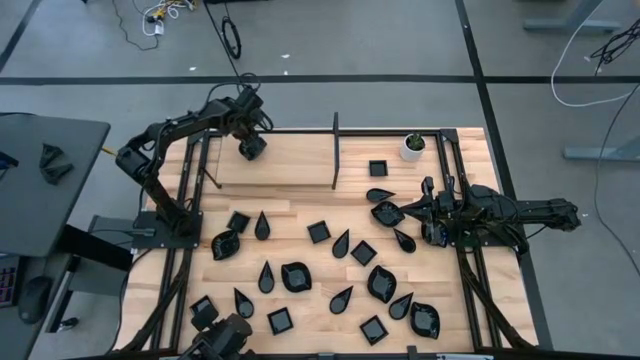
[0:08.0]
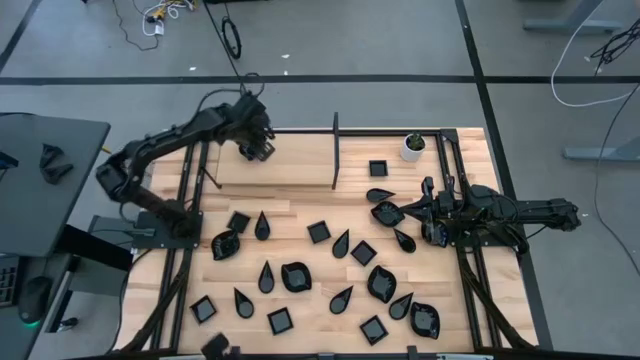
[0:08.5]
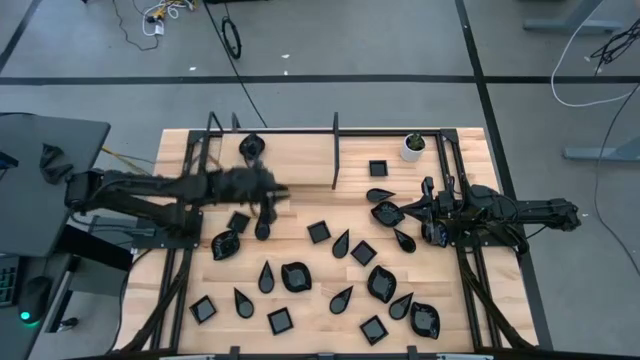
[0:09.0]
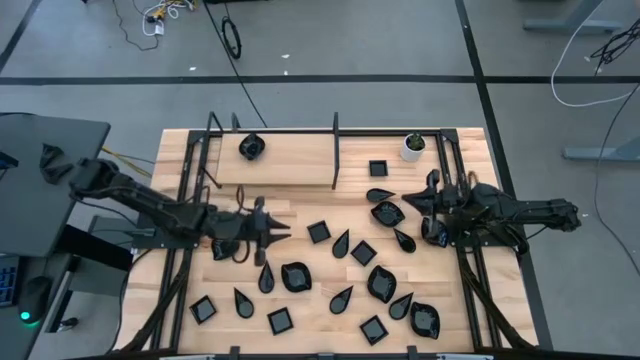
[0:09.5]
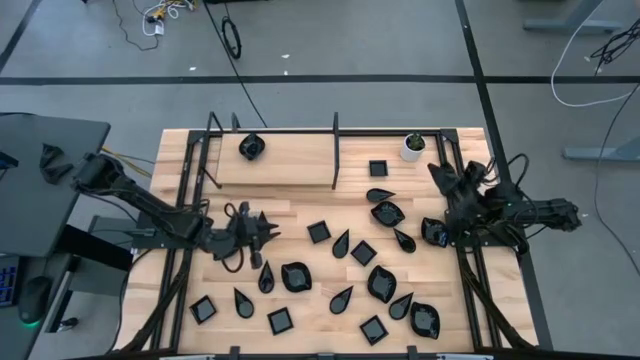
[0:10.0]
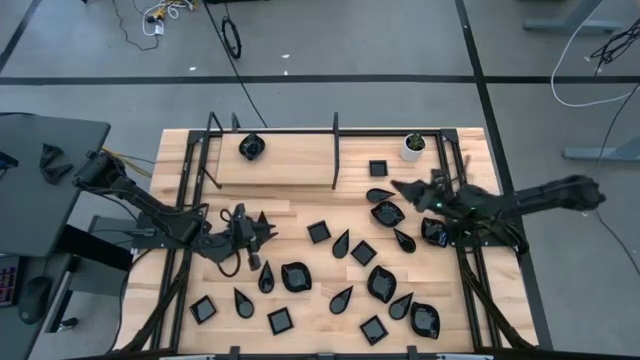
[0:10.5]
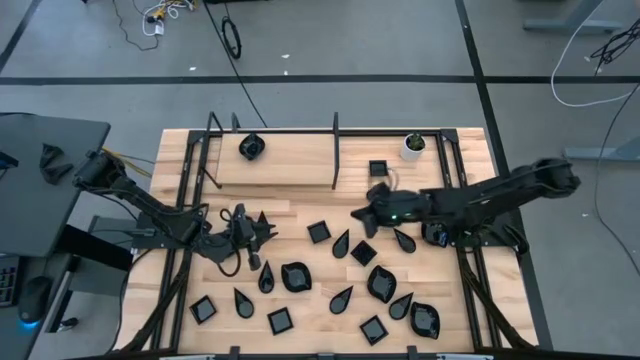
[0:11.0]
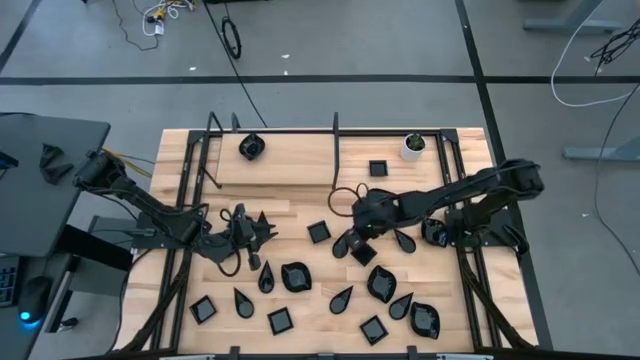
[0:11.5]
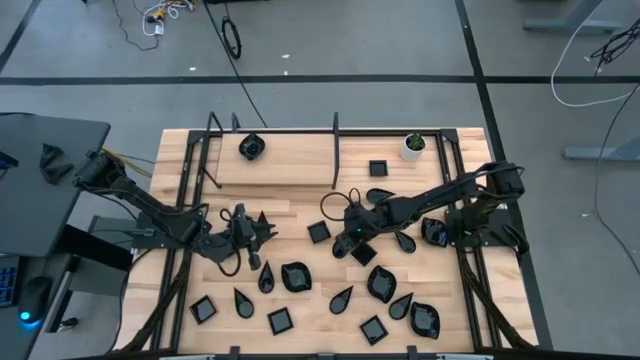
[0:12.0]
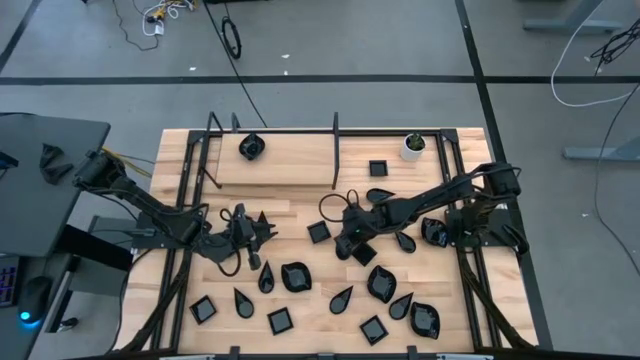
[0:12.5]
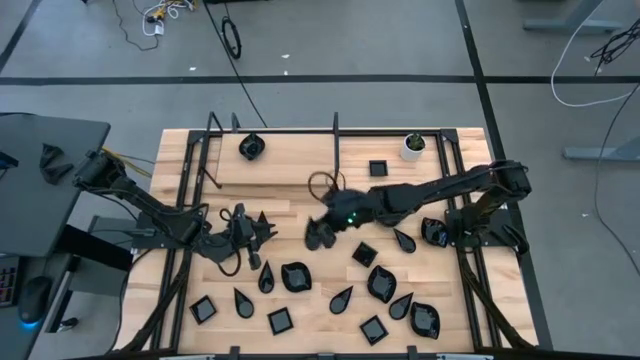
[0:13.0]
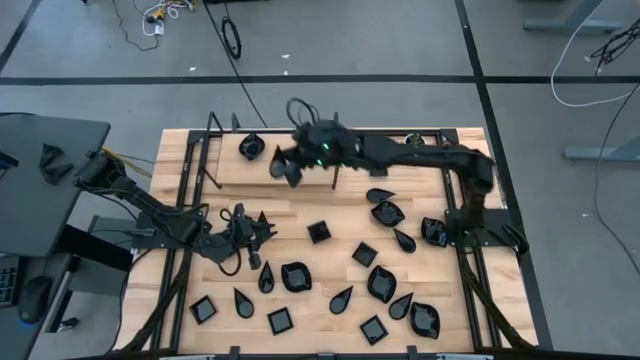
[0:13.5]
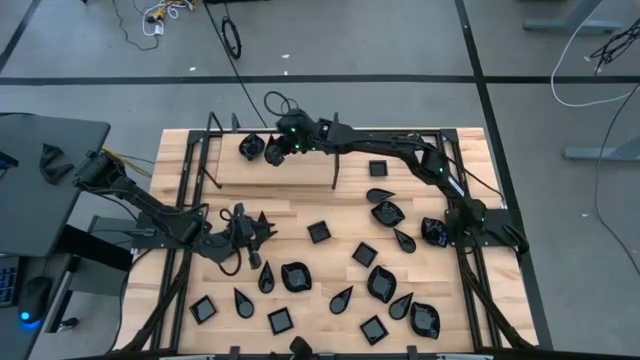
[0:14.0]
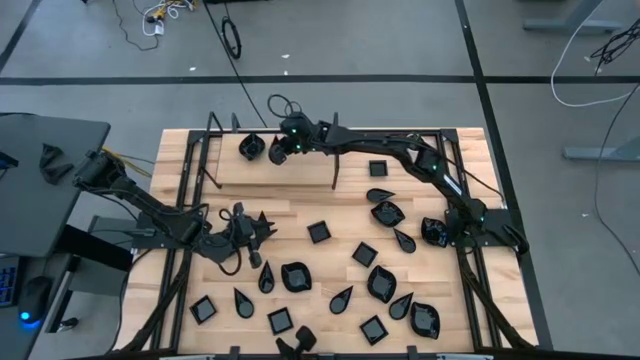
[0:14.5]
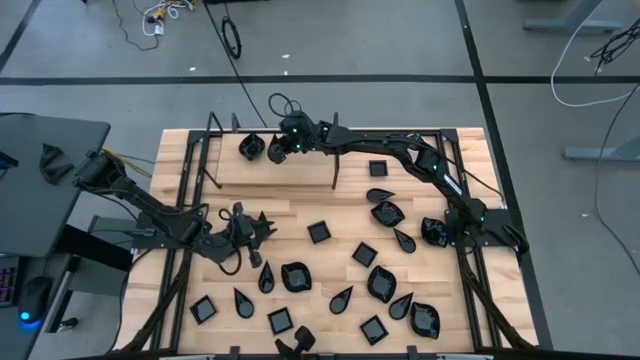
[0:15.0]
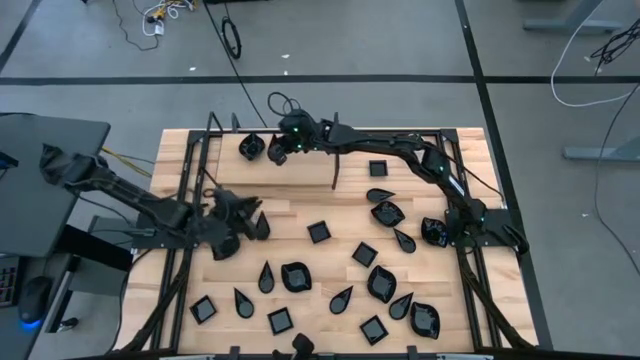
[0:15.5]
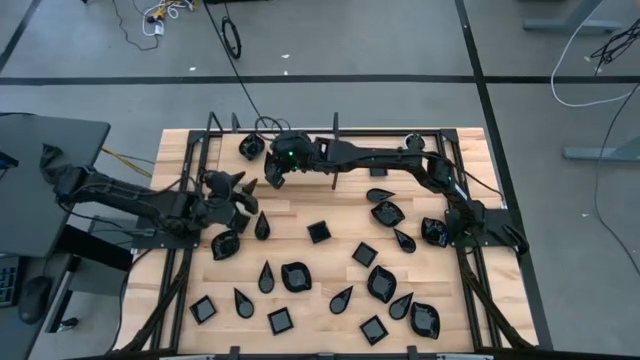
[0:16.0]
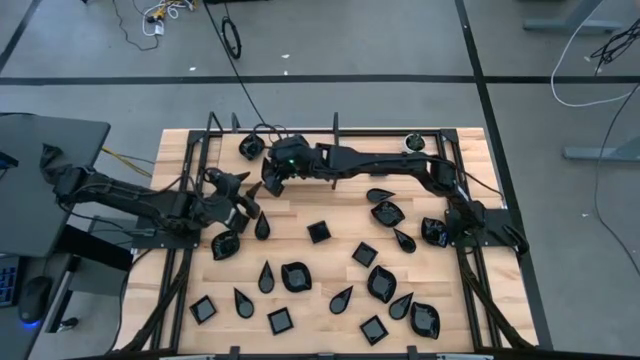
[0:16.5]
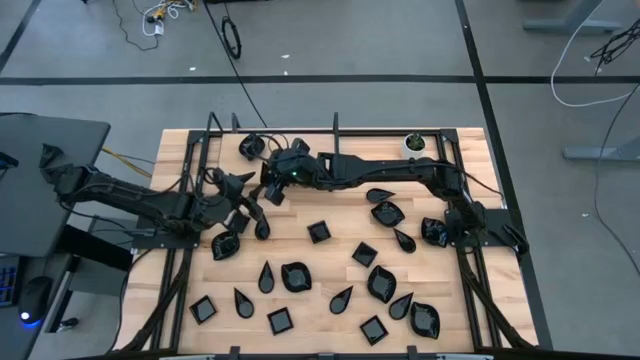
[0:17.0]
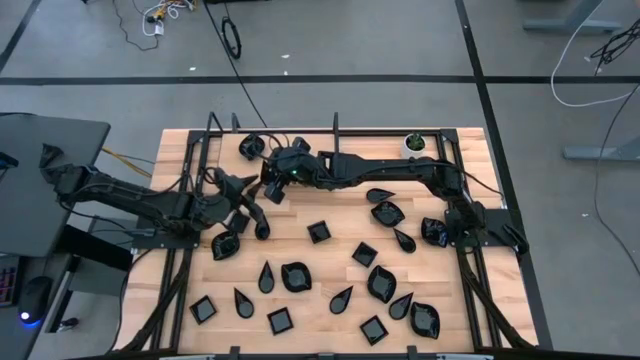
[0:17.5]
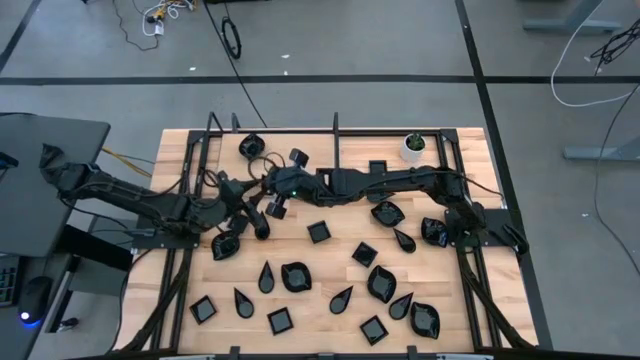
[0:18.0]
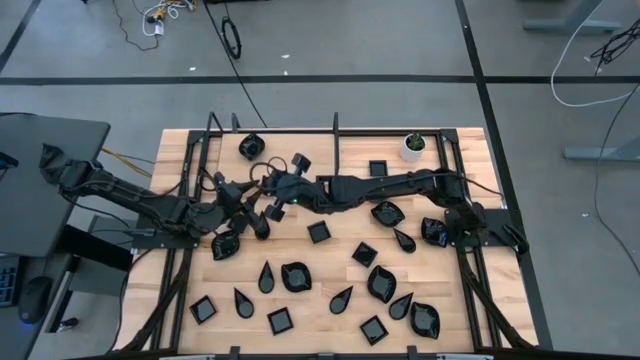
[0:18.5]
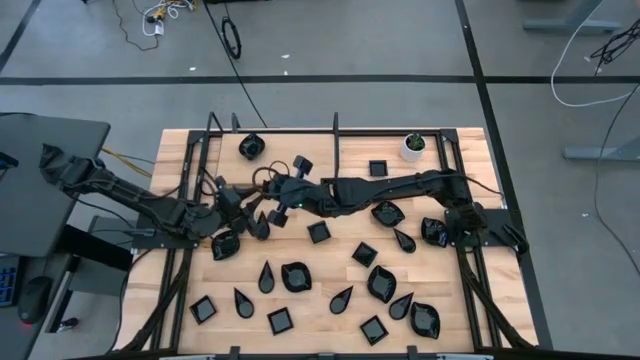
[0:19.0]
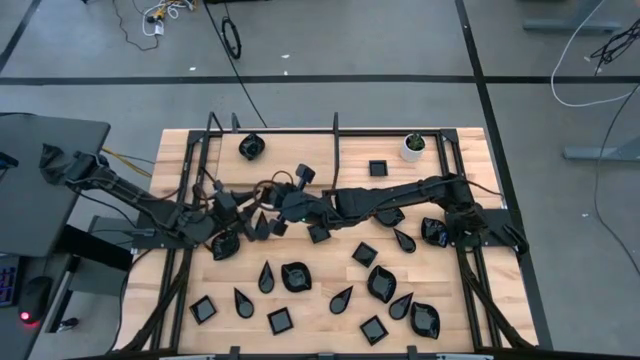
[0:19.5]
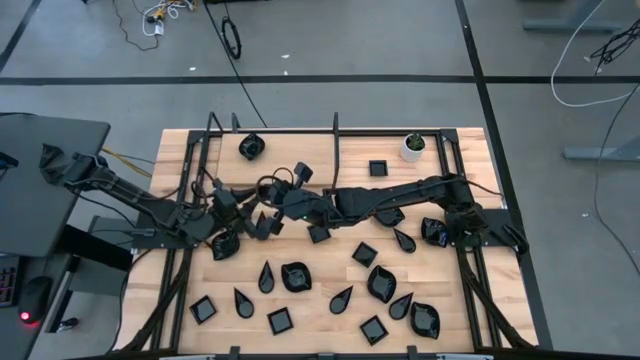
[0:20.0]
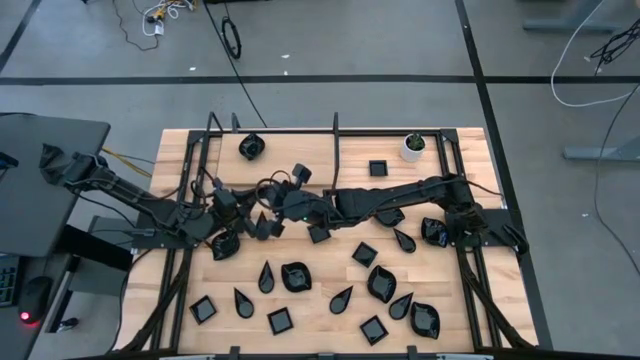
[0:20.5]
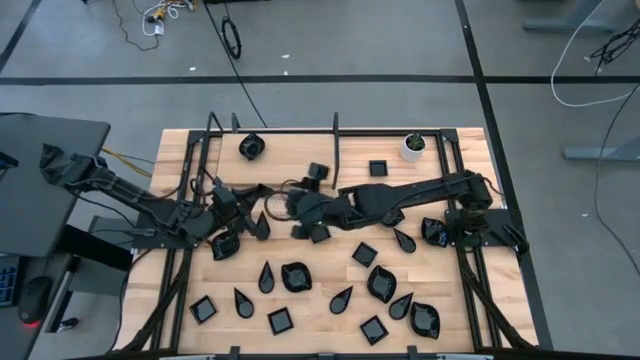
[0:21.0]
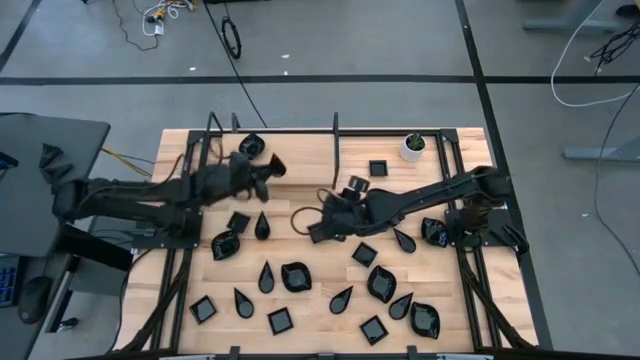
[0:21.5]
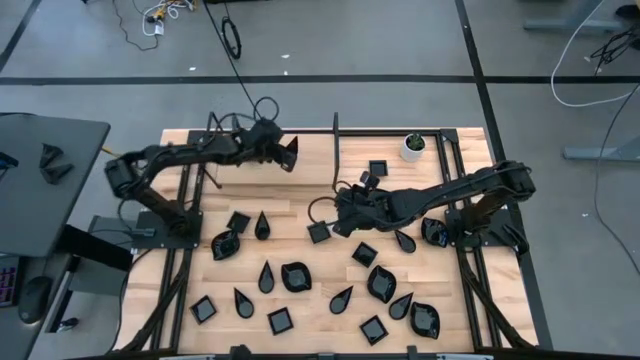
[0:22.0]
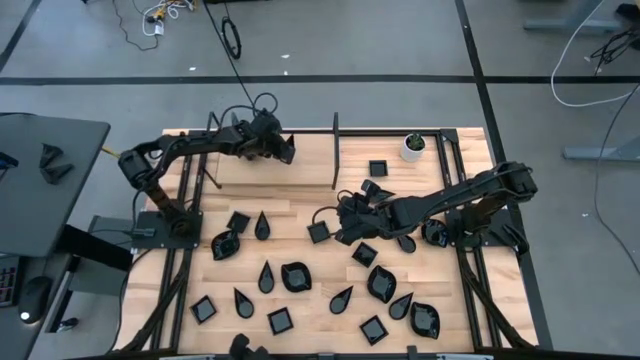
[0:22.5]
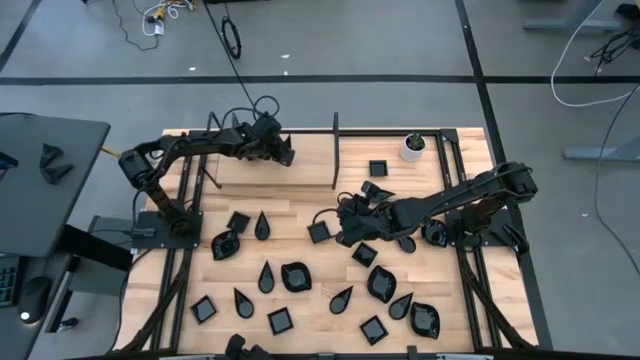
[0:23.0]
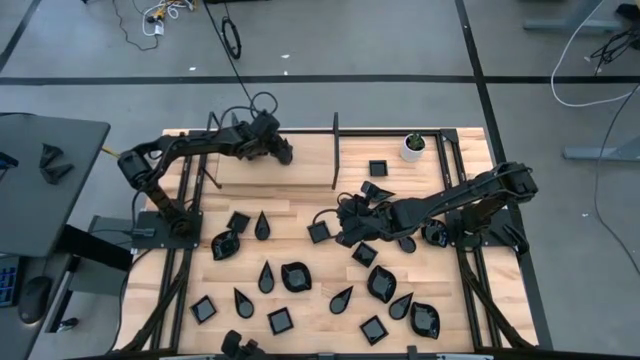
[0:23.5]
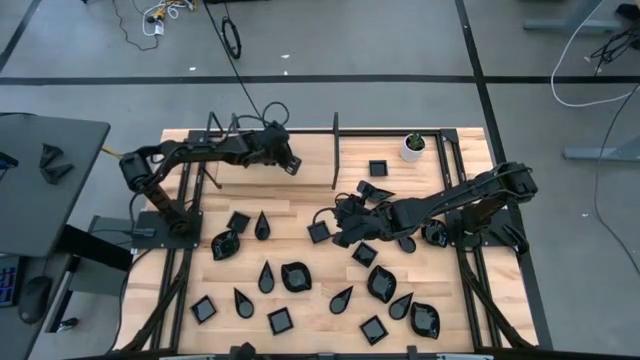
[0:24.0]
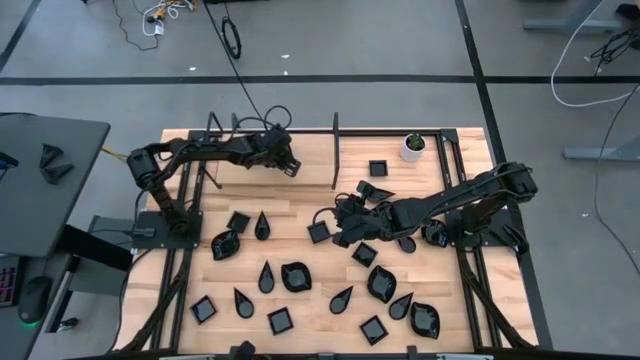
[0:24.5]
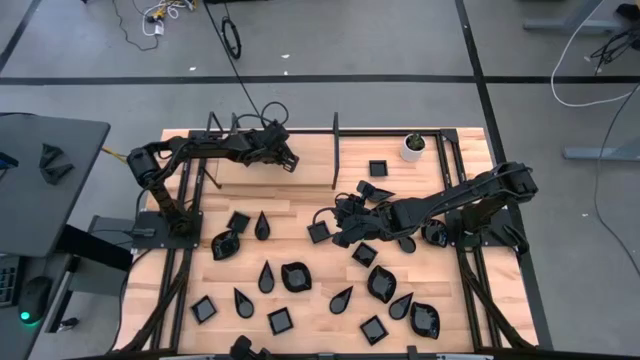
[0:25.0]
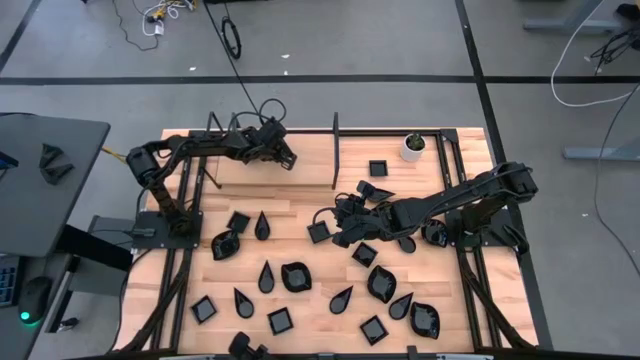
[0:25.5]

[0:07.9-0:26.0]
Task: Pick & Place Mini shaped plates
Put the black drop-shaped plate on the shelf

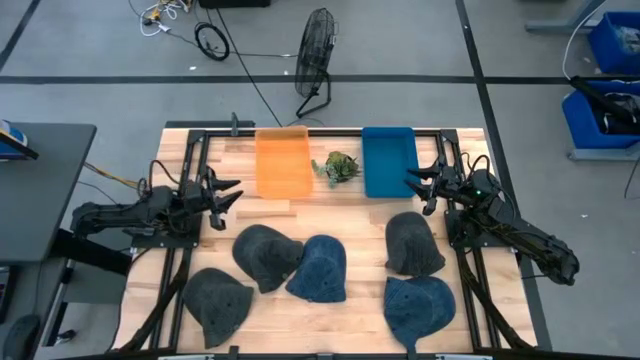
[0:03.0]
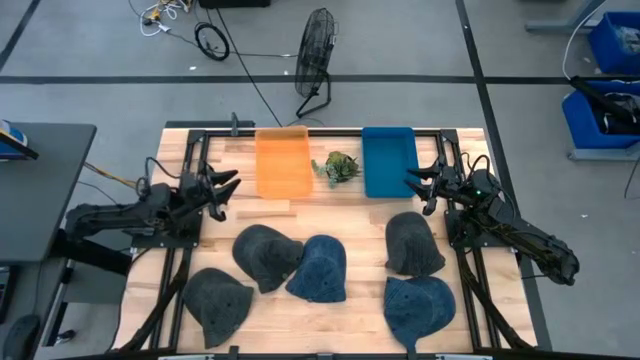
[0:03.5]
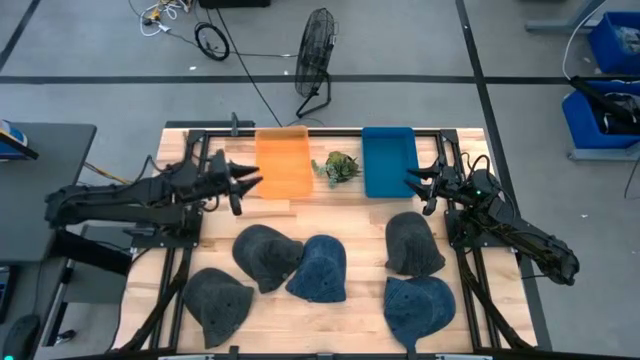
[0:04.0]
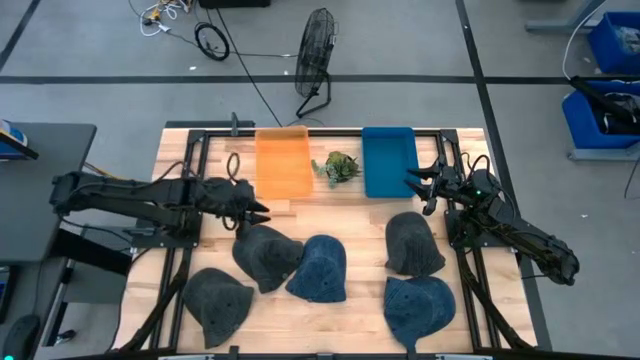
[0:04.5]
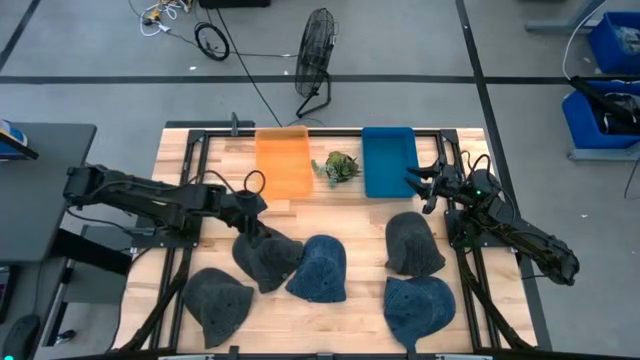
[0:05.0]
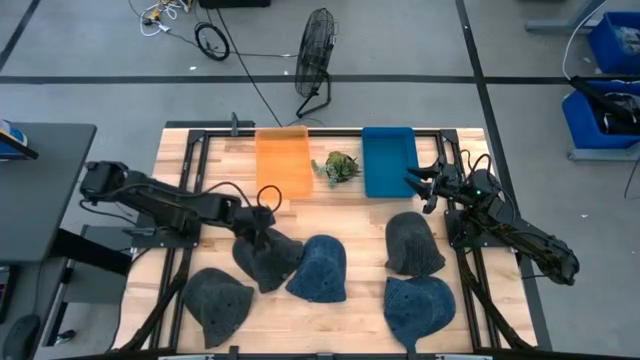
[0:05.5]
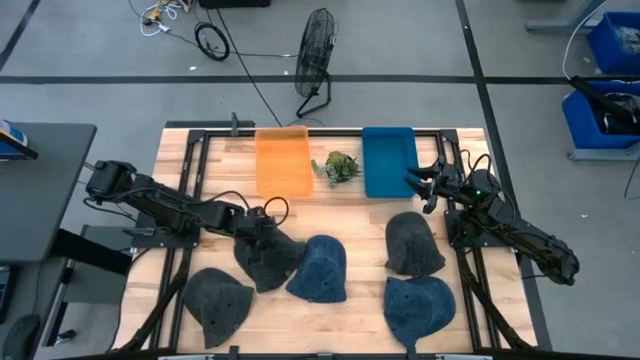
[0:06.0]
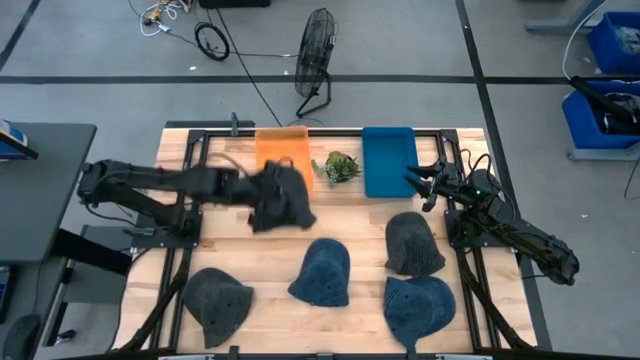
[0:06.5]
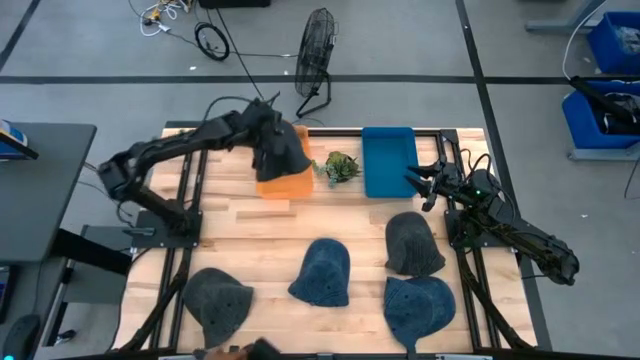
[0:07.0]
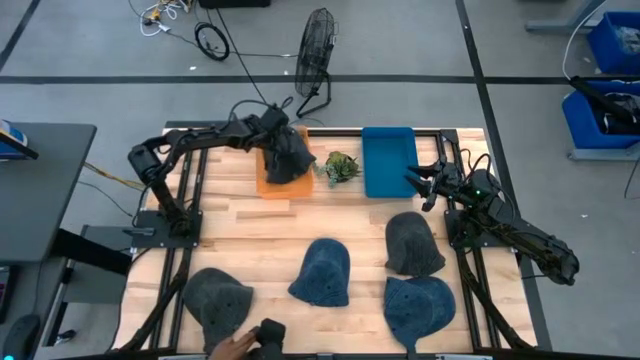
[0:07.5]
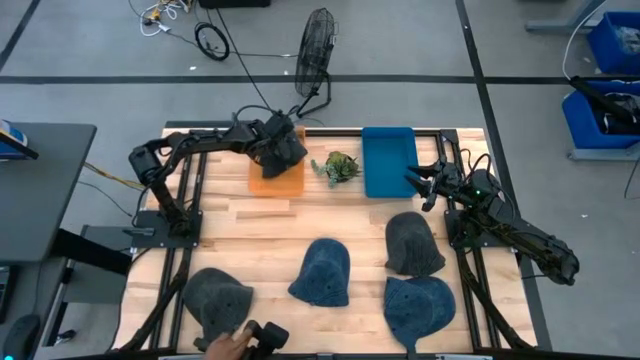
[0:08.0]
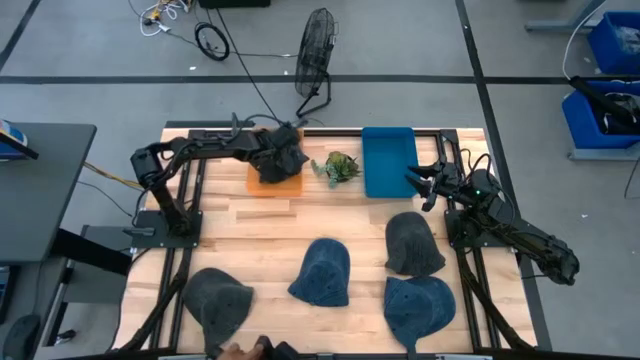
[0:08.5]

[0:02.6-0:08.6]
Task: Pick & Place hat
Put the top left black cap into the orange bin
